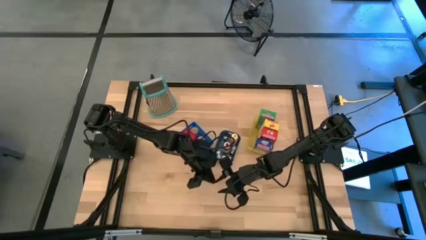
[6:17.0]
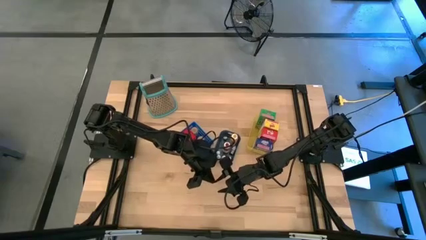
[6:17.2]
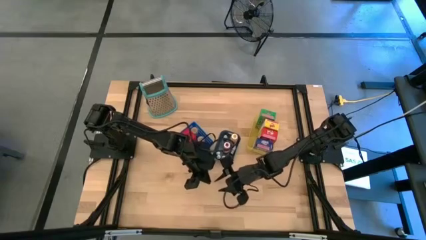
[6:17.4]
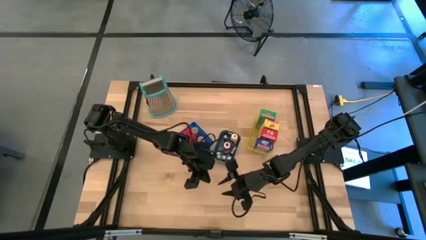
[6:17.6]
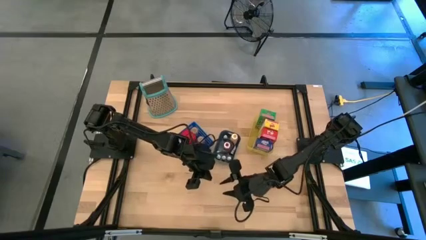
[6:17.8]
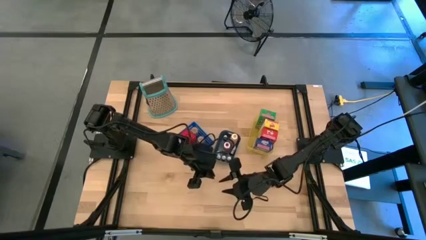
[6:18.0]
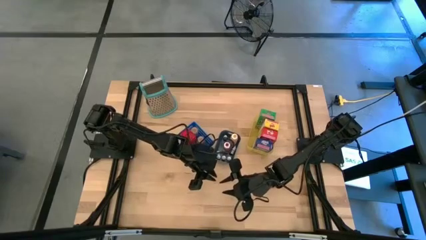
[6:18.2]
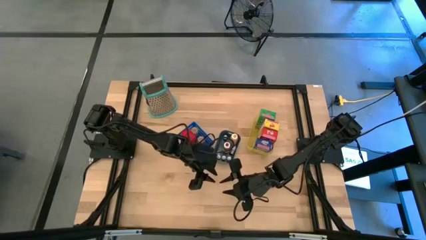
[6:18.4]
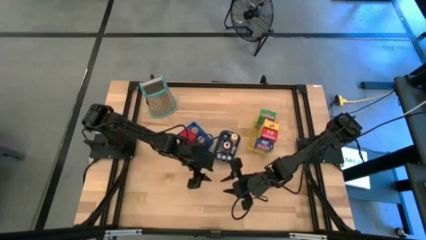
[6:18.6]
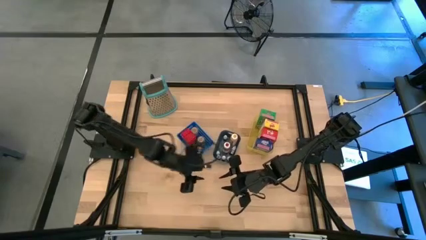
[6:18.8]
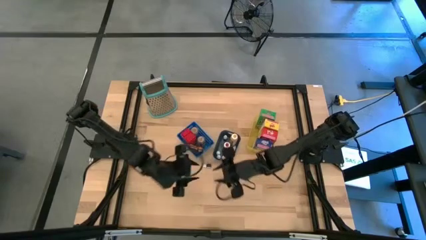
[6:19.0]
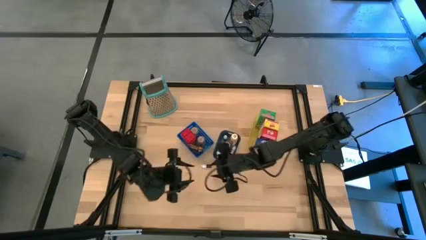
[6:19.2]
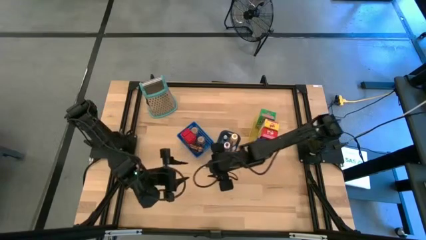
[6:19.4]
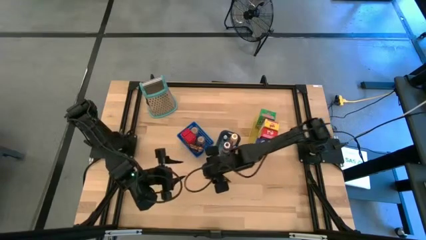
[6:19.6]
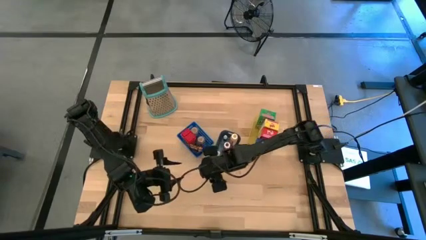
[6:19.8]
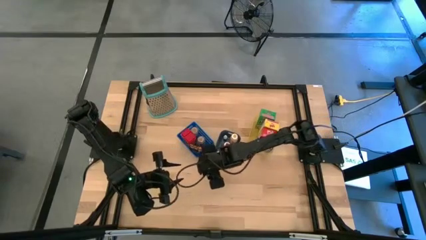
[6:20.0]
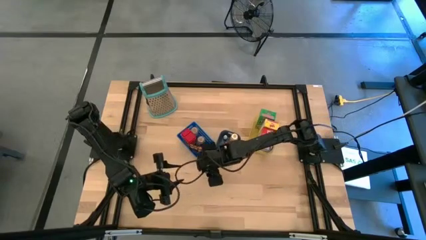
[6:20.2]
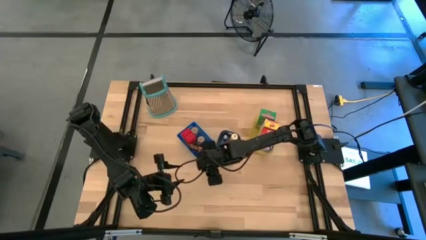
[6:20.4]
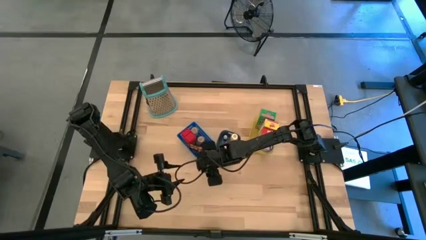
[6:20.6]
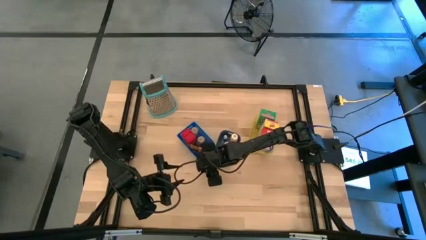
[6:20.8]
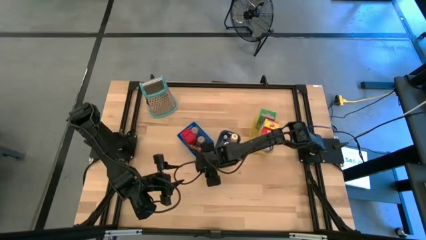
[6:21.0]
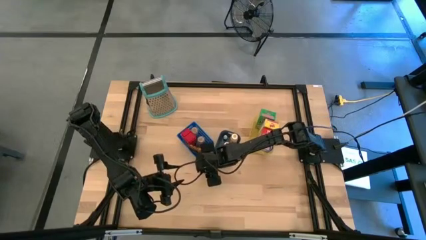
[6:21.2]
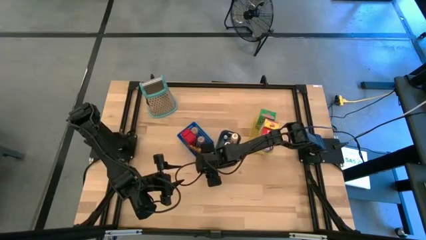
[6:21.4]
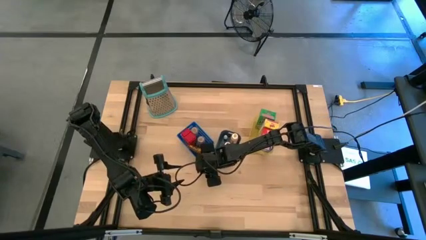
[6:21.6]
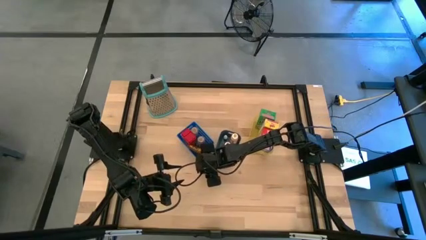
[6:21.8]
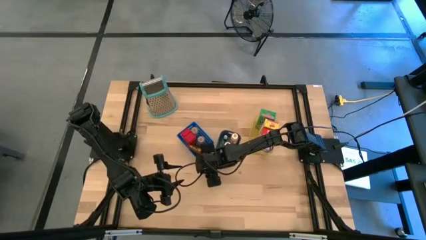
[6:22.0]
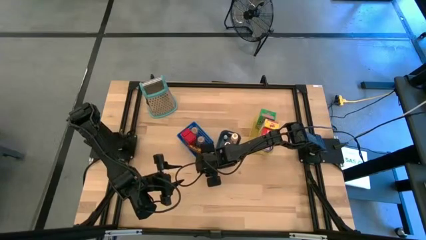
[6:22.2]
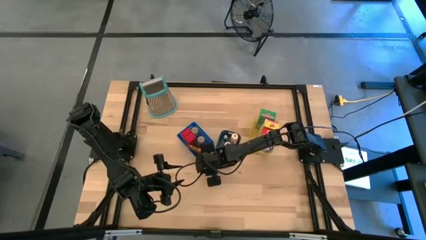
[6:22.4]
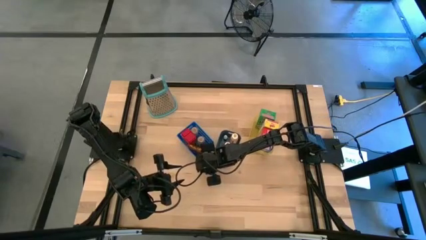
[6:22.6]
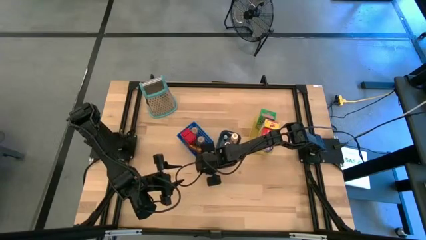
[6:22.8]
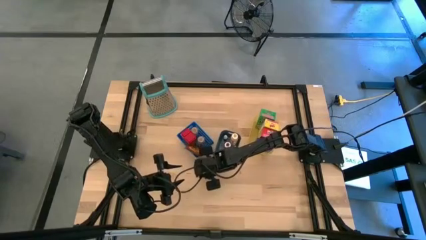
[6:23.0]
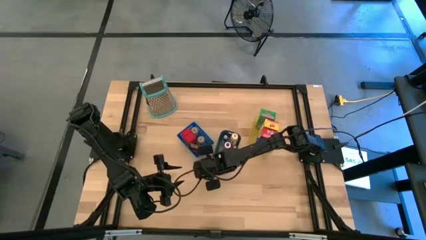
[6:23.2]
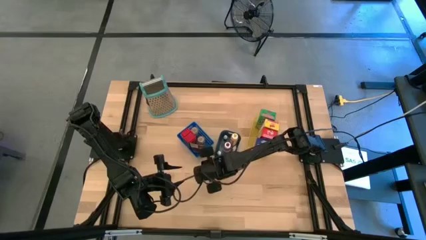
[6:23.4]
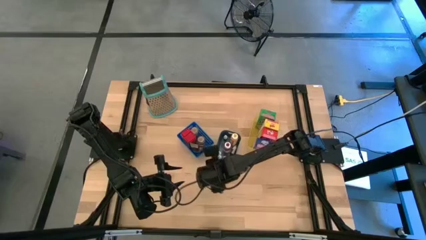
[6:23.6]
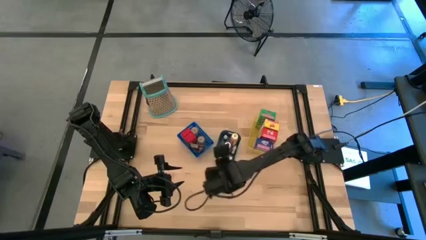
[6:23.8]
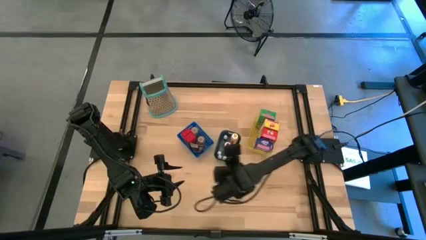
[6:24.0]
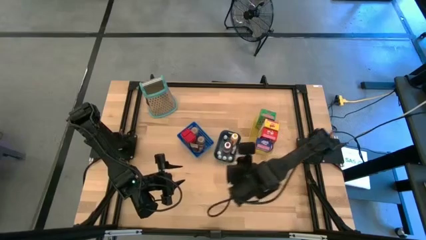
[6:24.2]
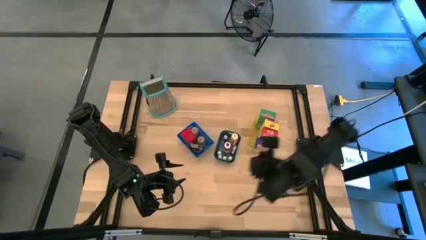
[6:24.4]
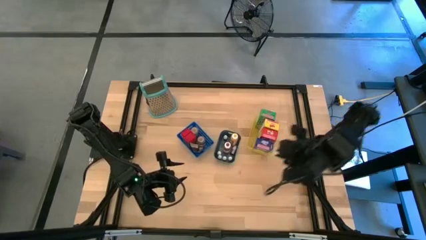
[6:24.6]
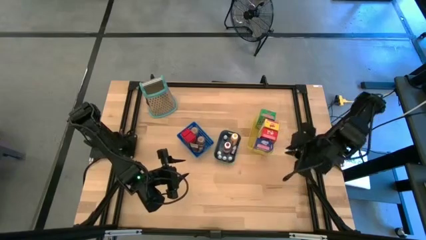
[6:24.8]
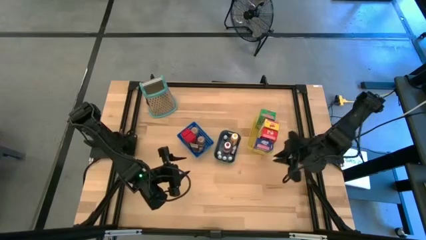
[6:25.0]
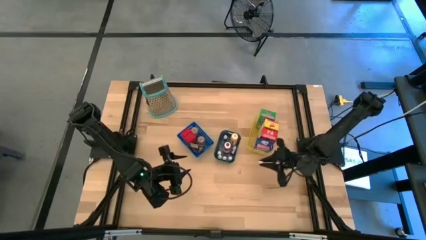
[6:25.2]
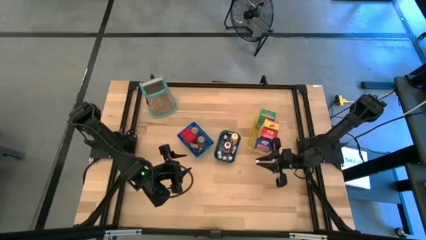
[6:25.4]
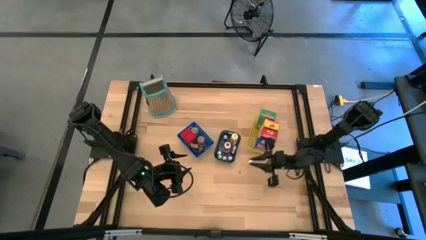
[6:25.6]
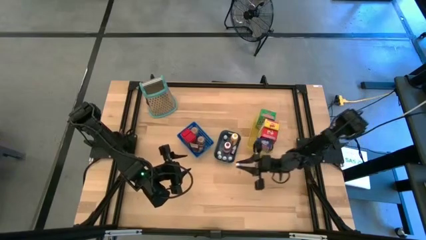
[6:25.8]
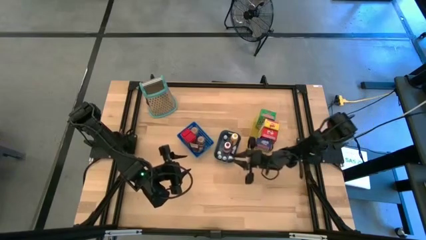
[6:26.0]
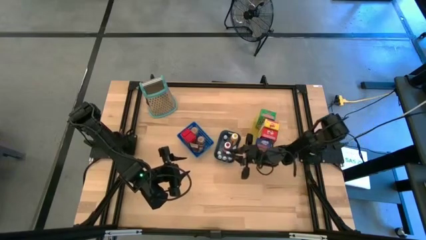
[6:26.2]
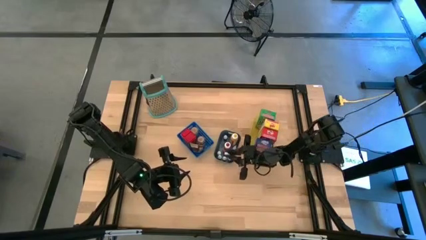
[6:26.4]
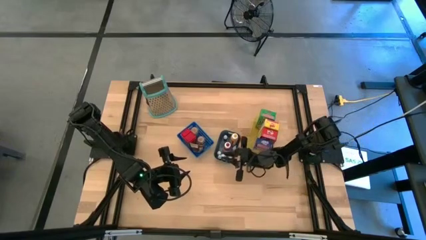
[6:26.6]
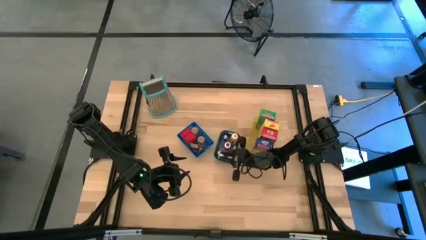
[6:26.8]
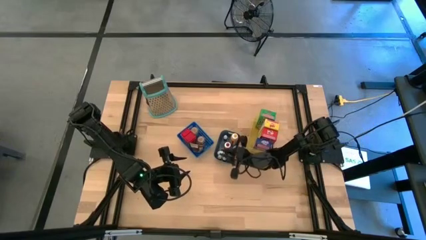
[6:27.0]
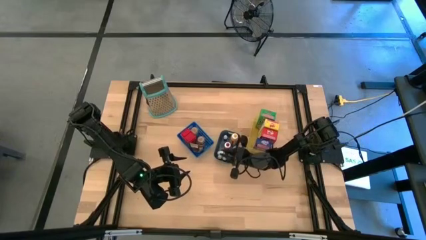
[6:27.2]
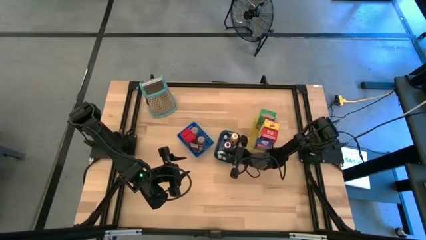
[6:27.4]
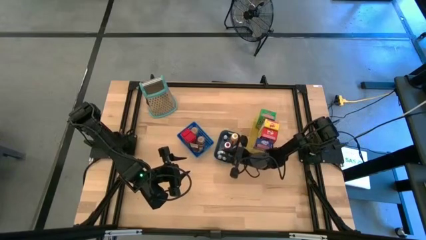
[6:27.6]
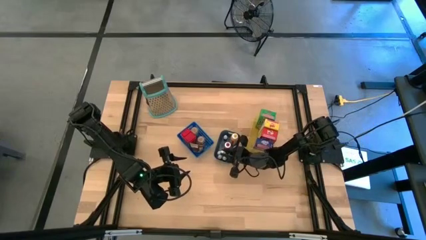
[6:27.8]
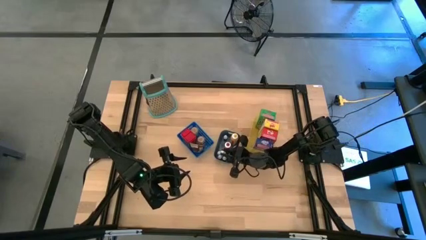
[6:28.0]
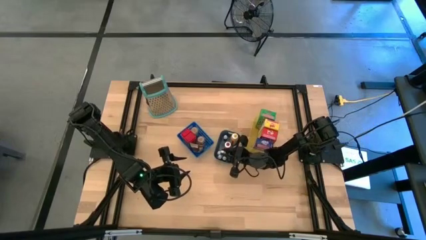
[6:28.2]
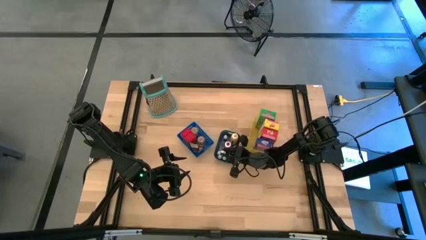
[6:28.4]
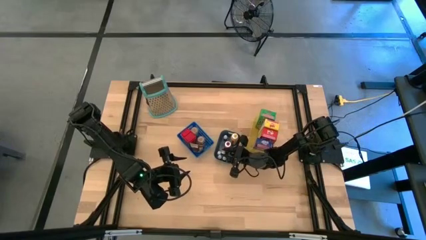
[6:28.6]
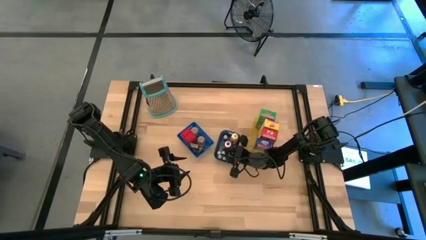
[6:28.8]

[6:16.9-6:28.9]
Task: Pick & Place Kitchen Items
Put the green food coloring bottle into the green bin
